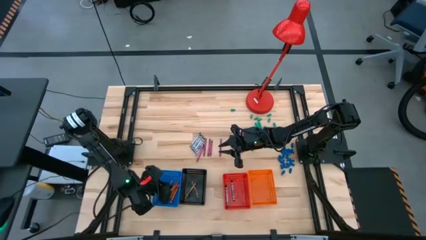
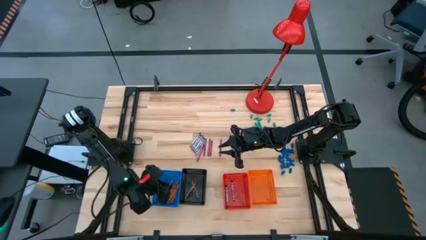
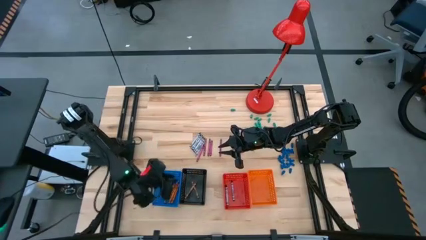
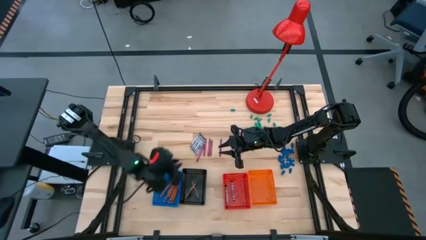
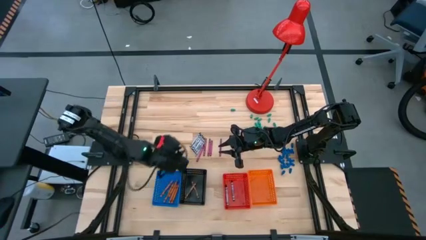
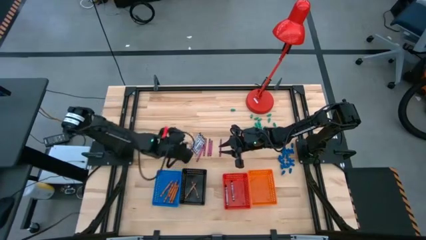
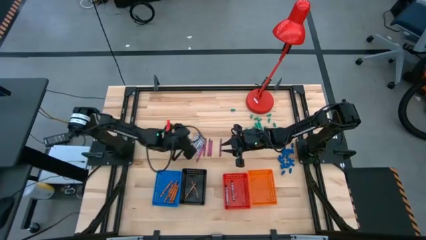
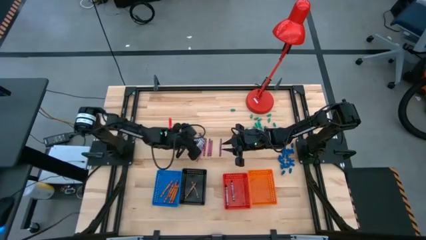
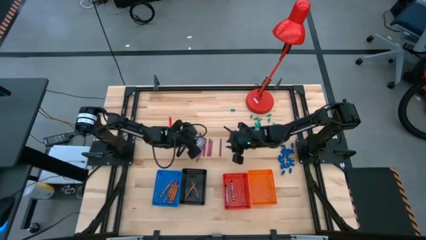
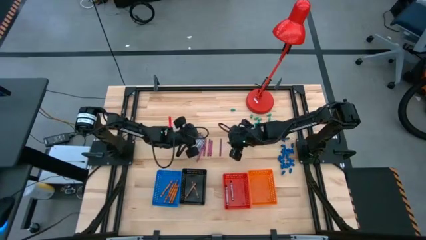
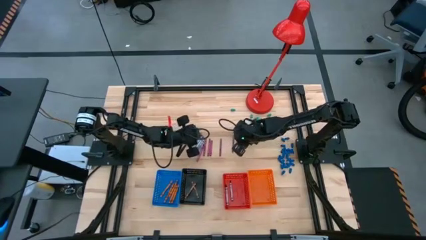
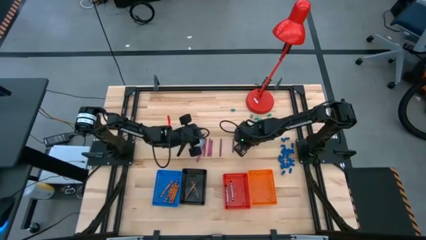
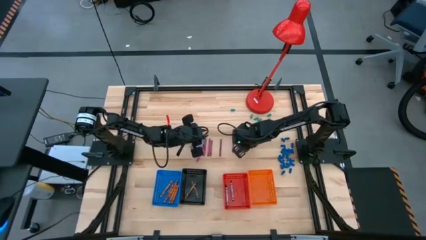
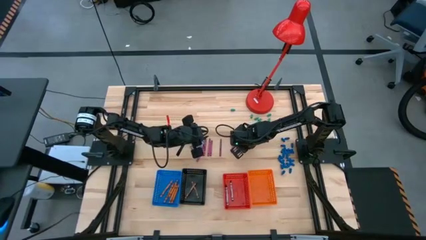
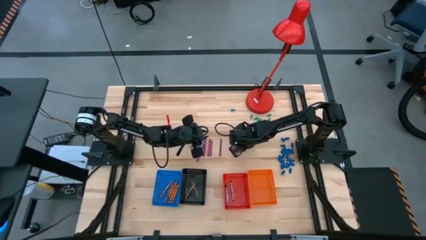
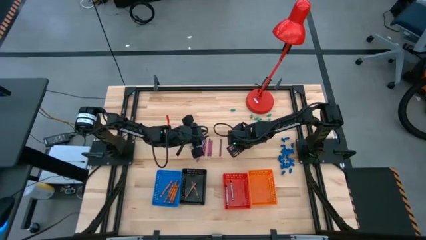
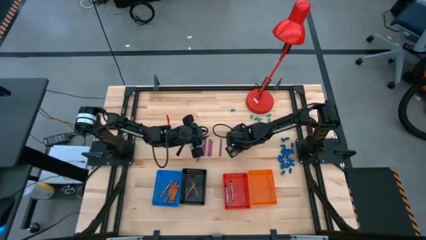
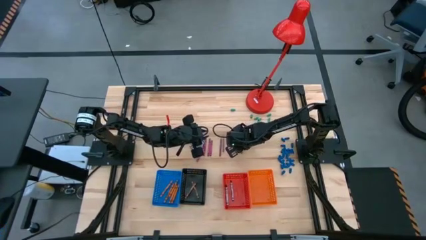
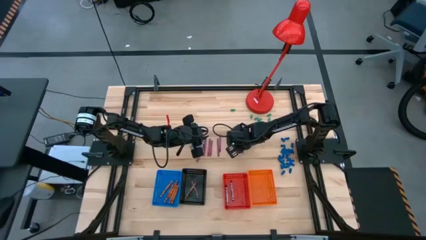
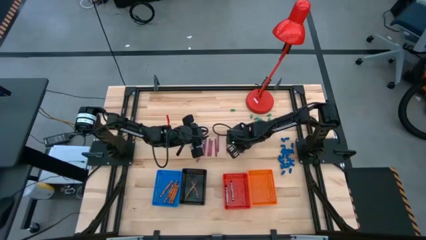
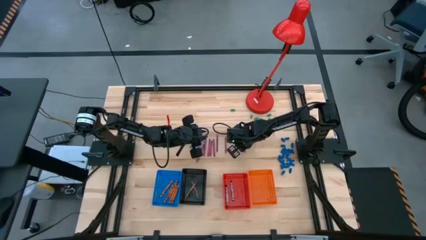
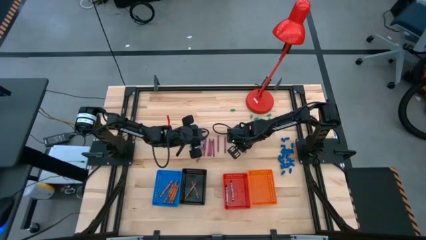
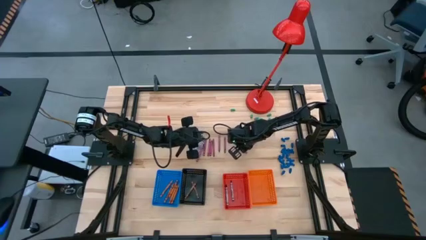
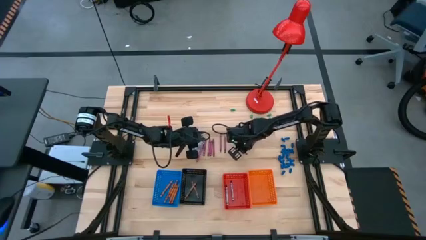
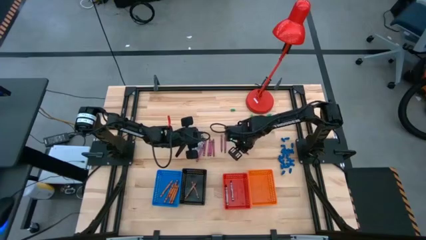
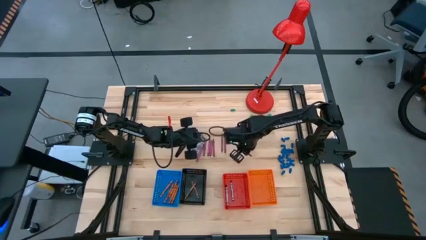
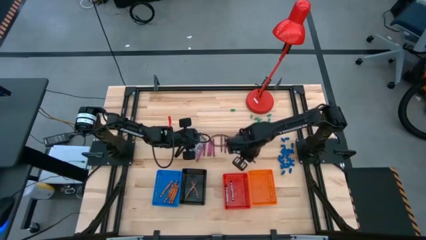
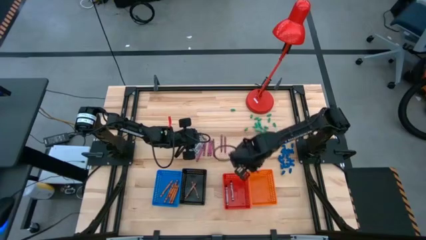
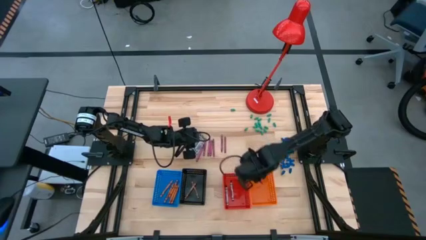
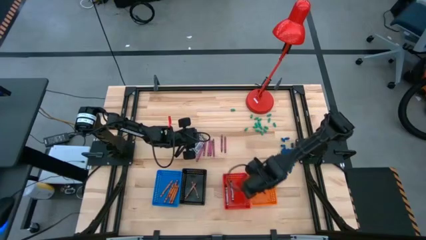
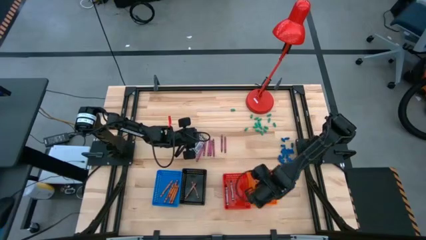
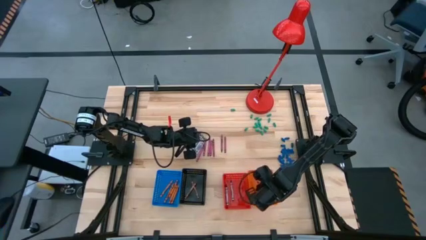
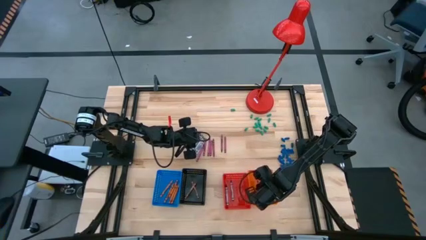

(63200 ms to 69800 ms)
Task: Sort crayons
Put the violet crayon into the orange basket

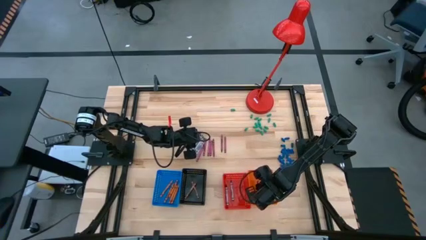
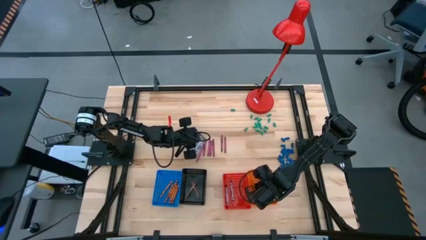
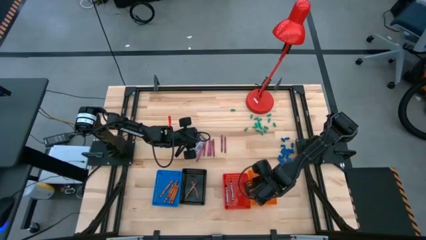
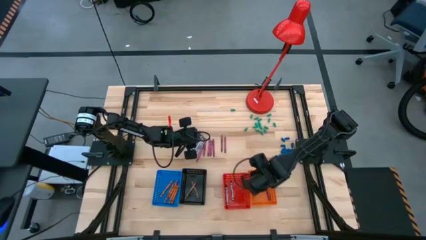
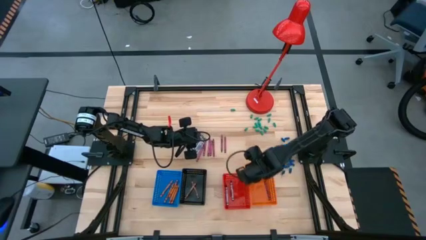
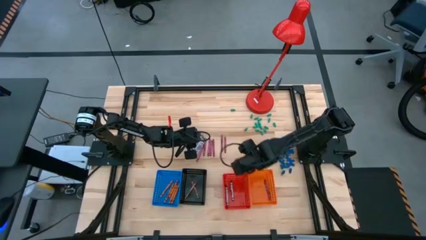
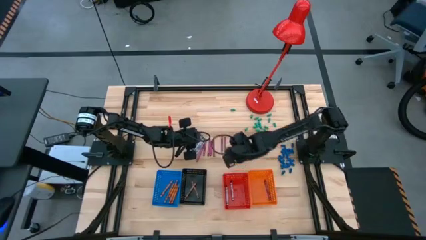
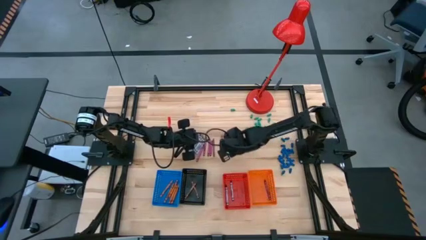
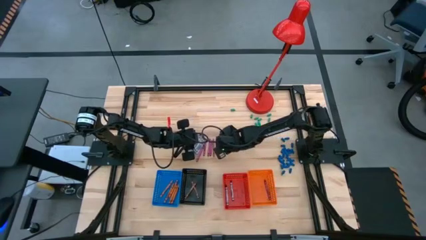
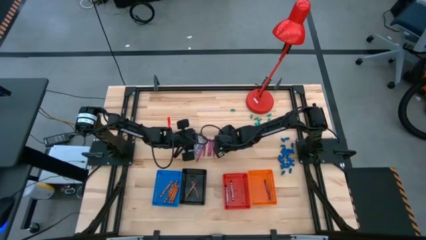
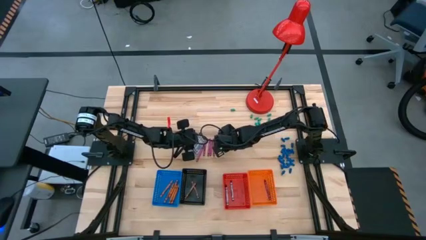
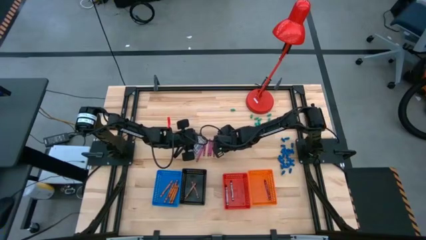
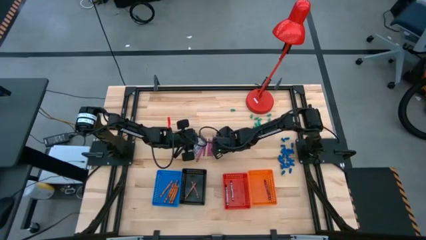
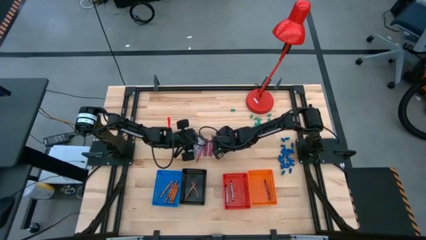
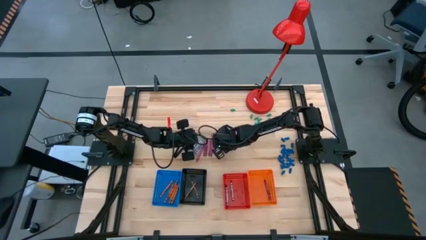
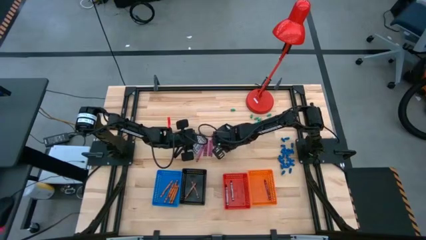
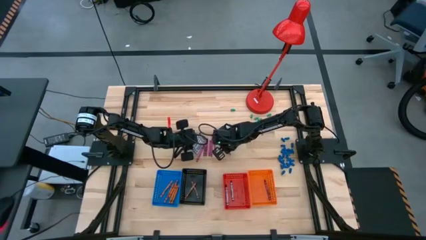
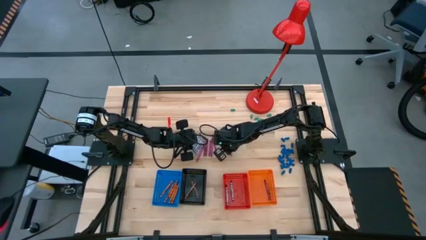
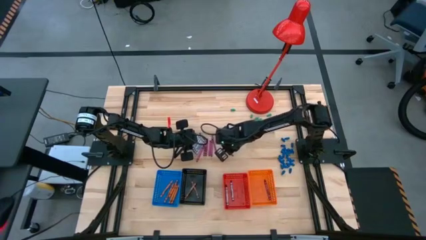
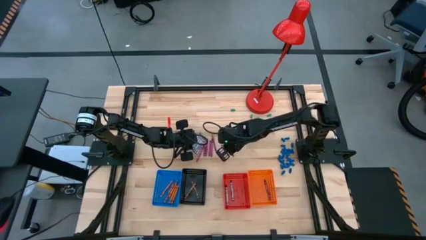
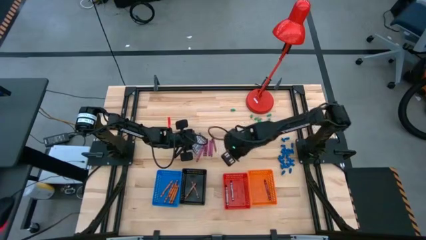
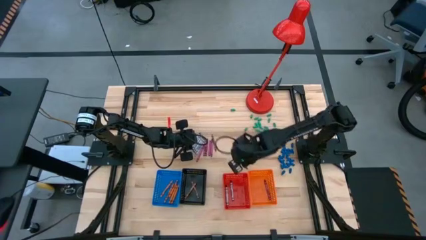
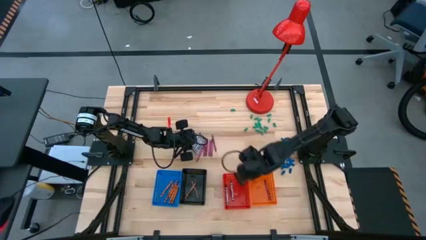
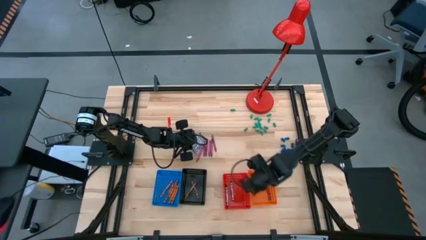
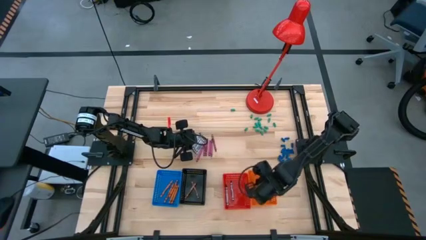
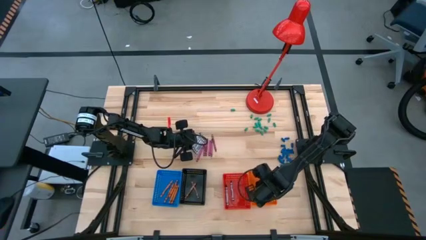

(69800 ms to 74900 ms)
Put the violet crayon into the orange basket

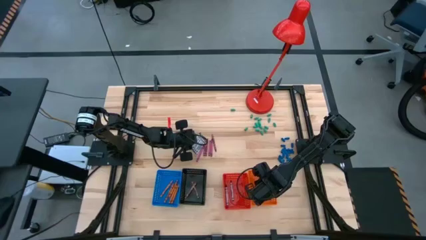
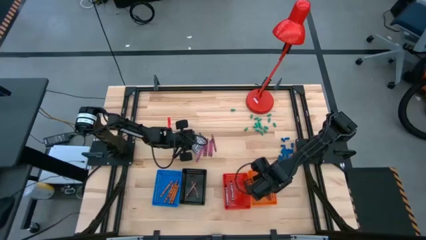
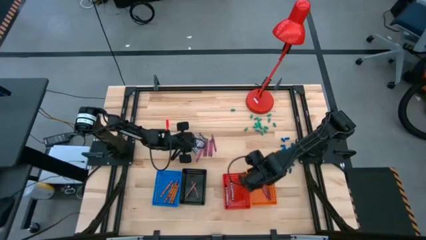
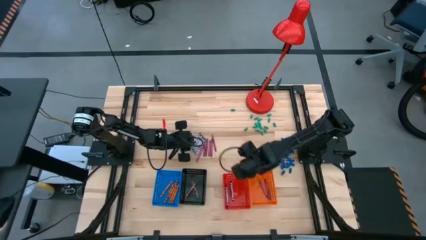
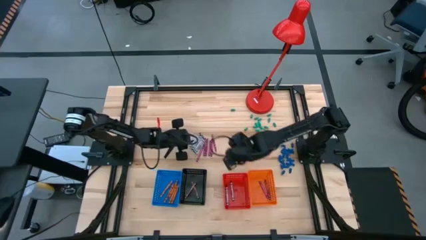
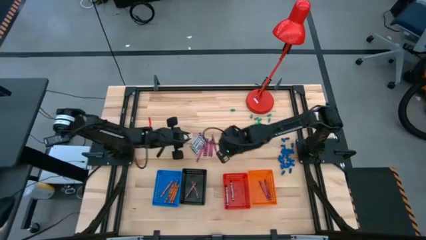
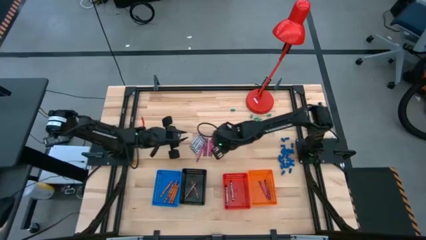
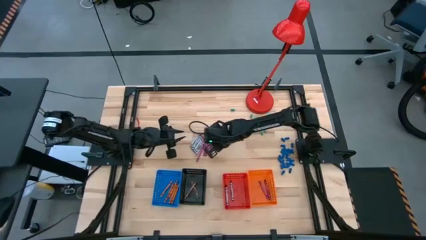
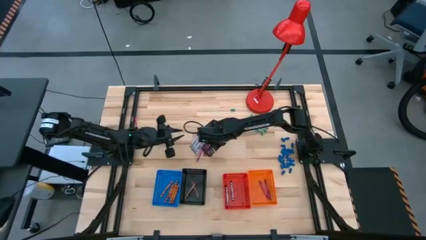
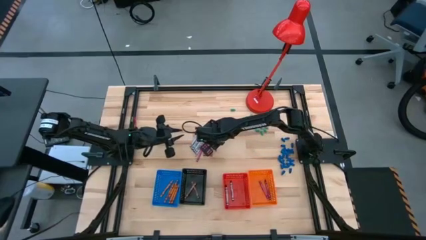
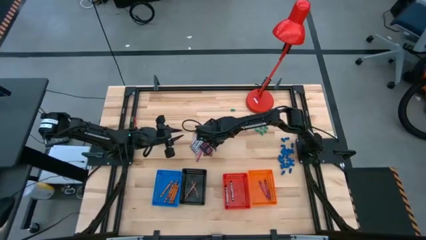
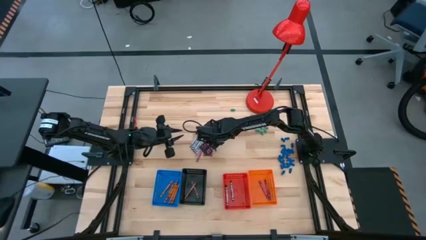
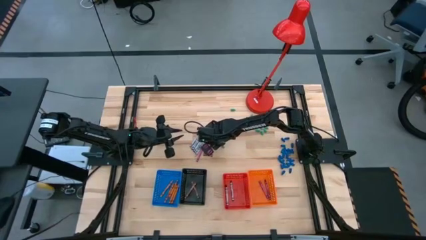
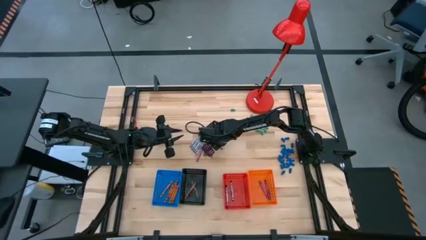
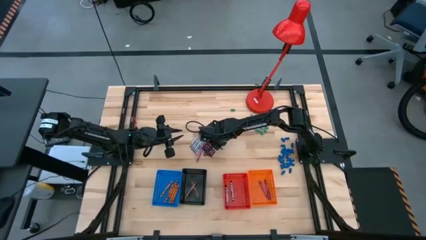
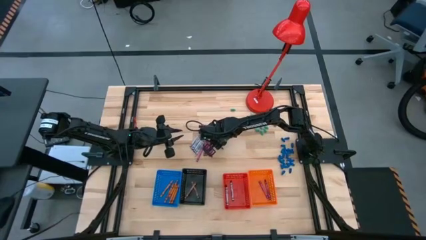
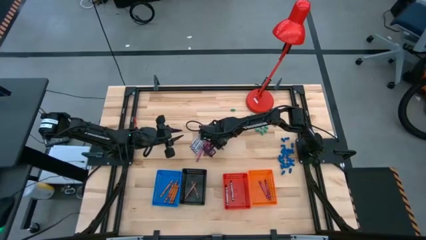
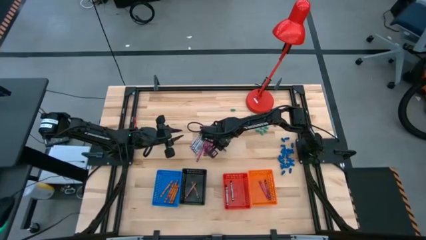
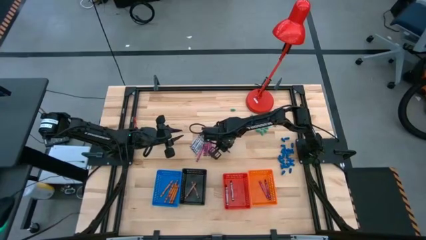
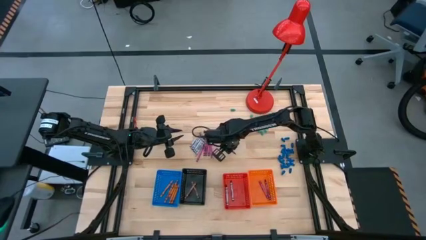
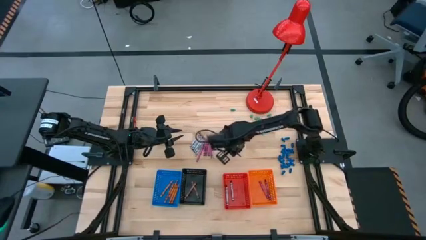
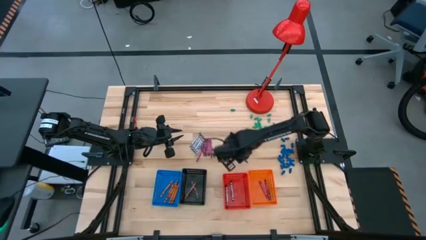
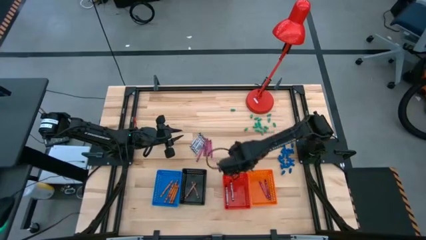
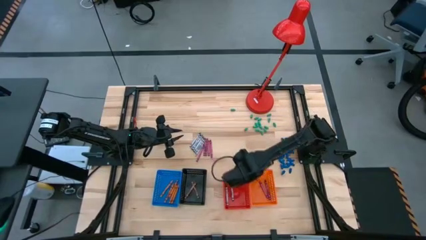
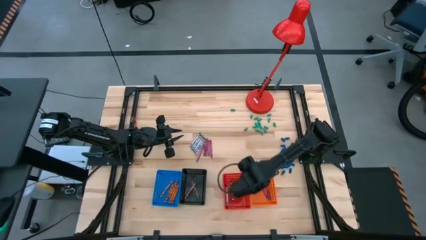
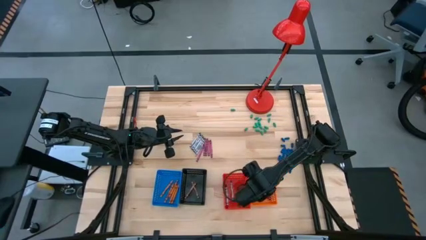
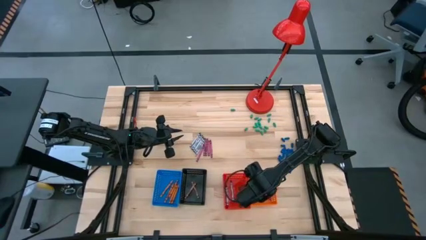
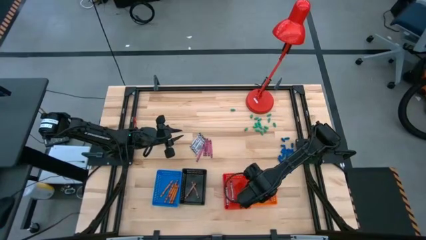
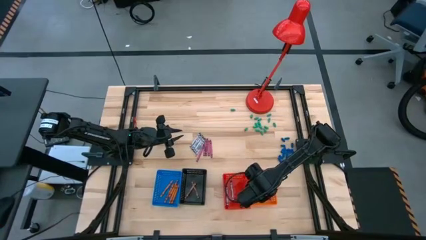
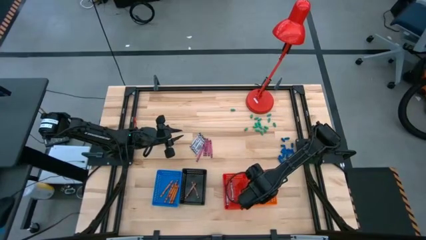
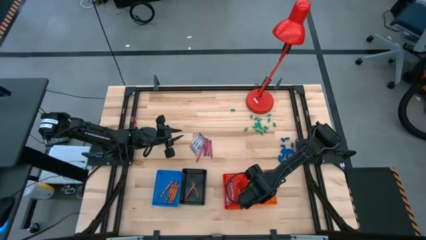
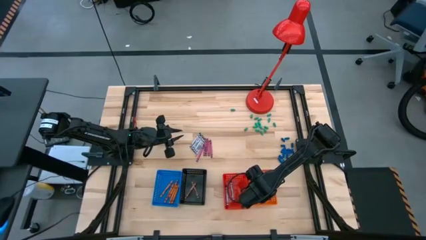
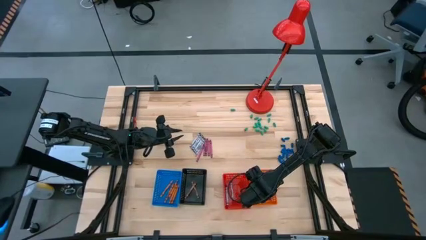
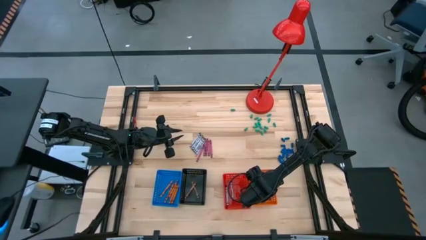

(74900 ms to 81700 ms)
Put the violet crayon into the orange basket
